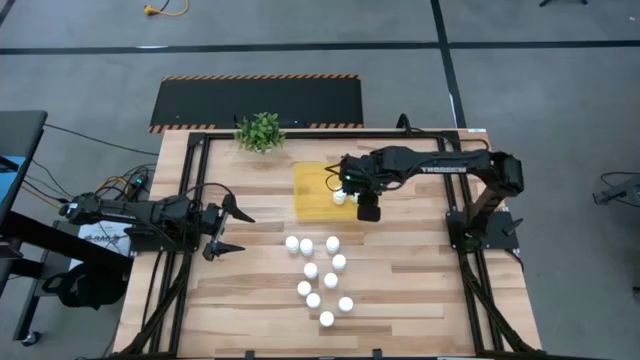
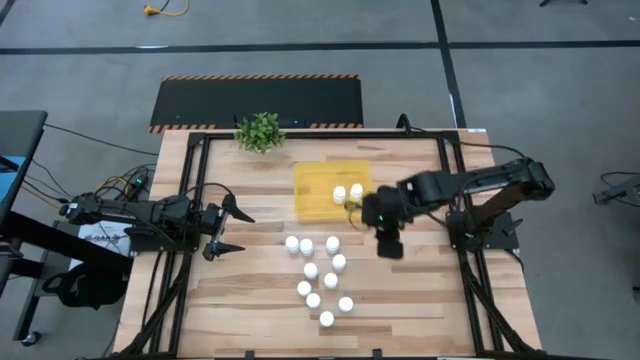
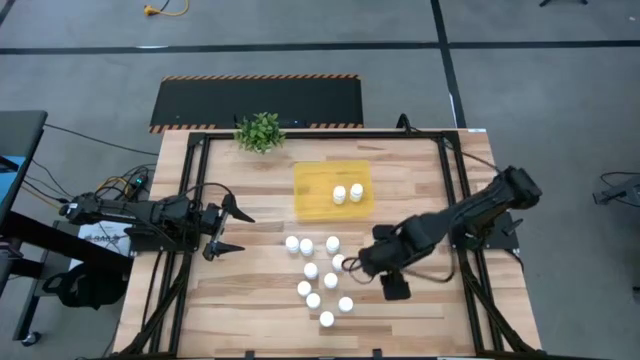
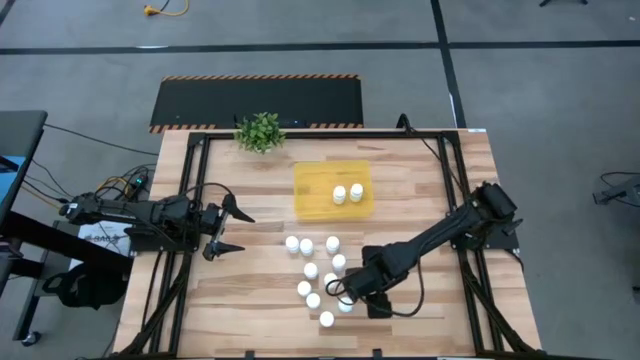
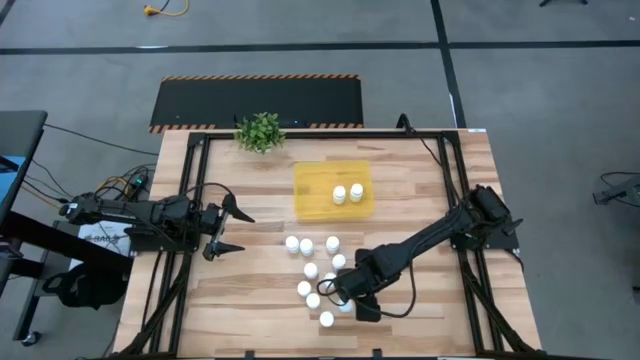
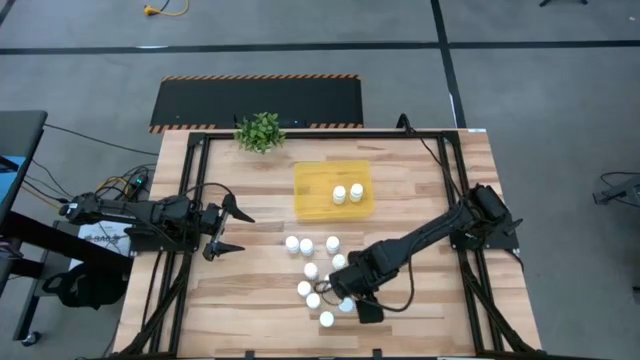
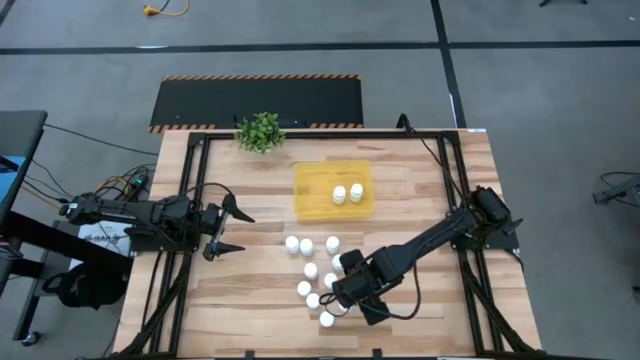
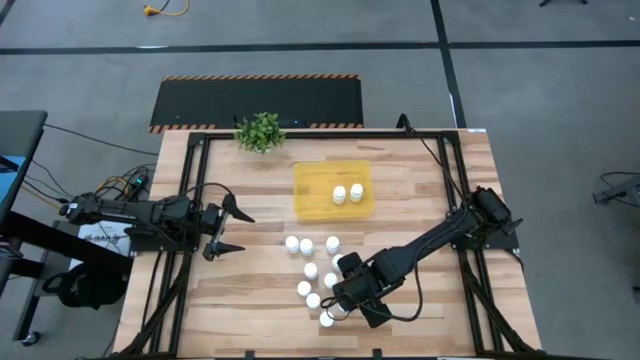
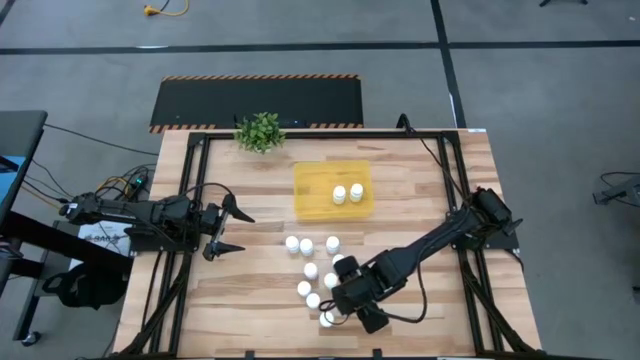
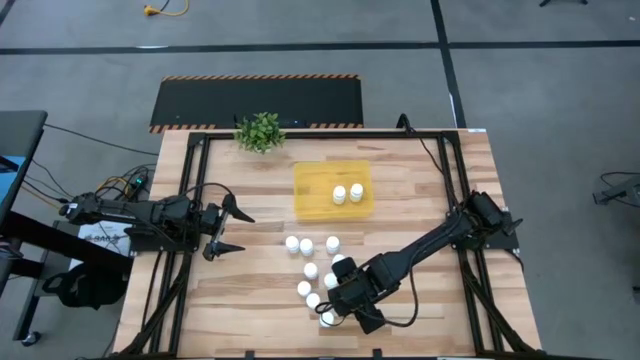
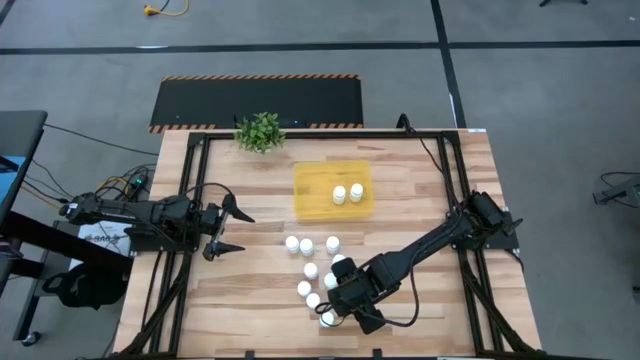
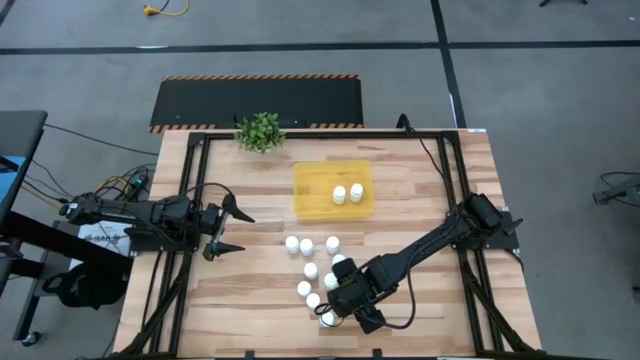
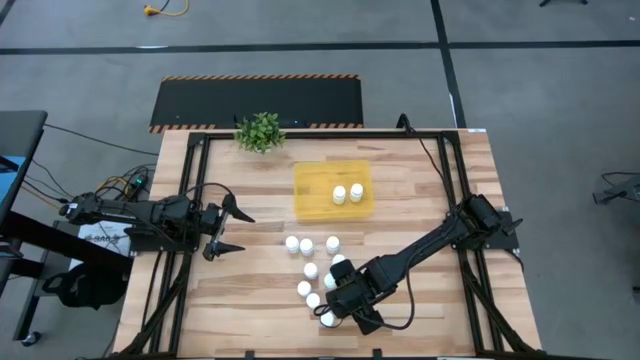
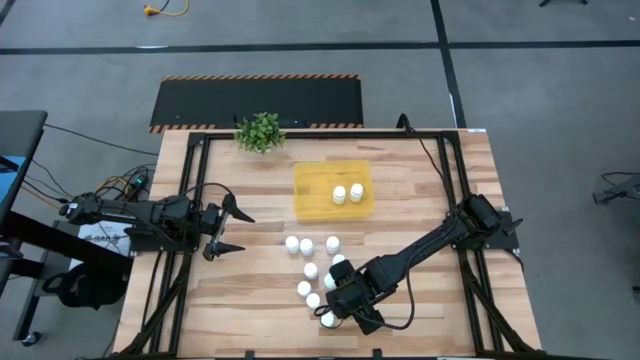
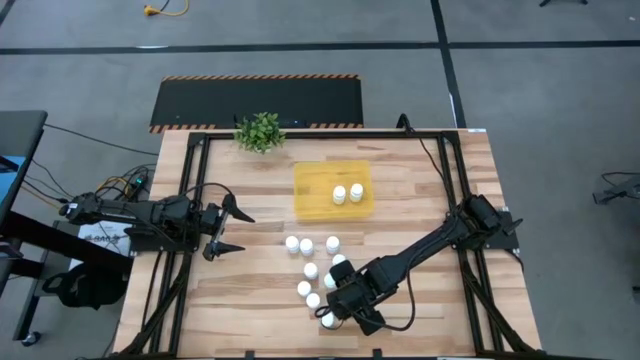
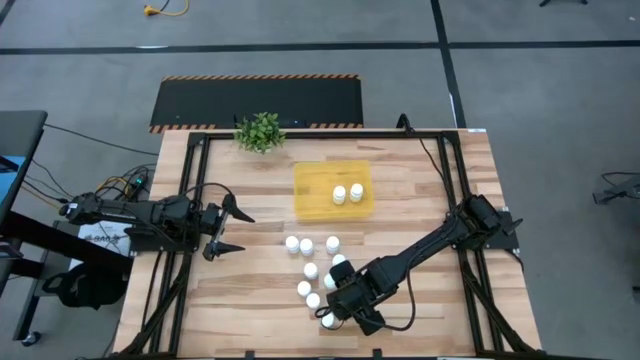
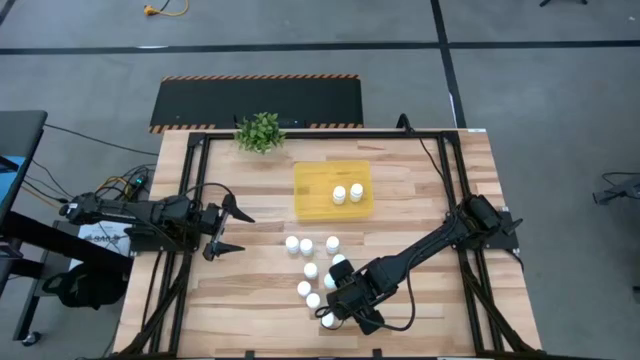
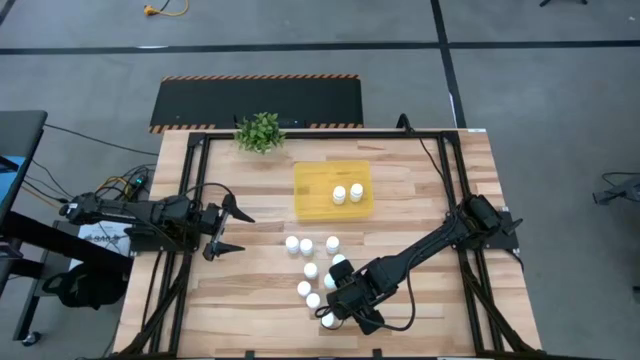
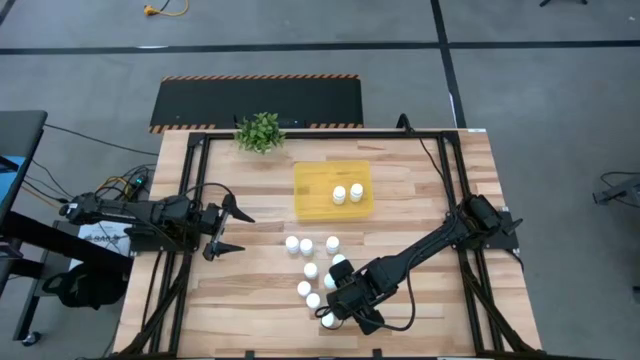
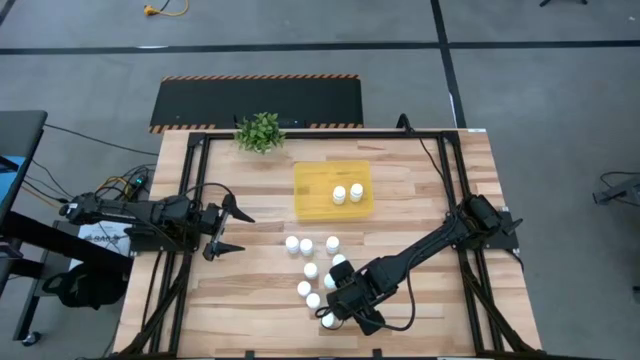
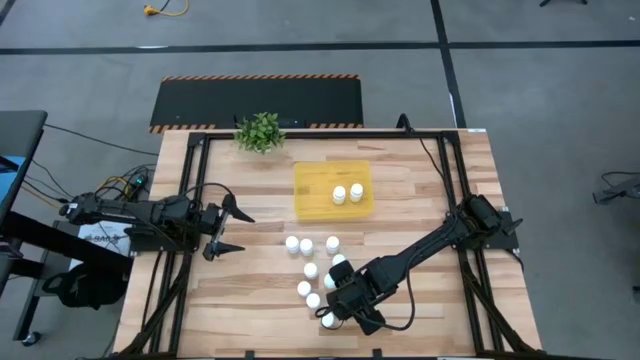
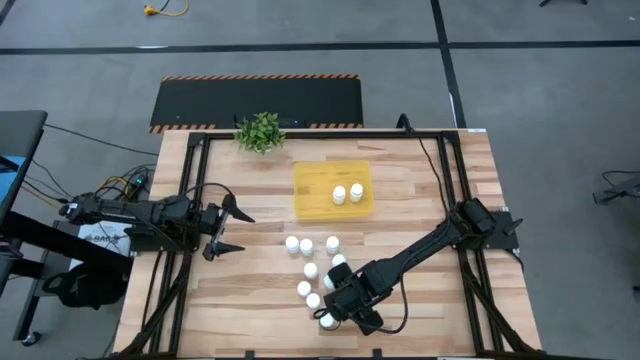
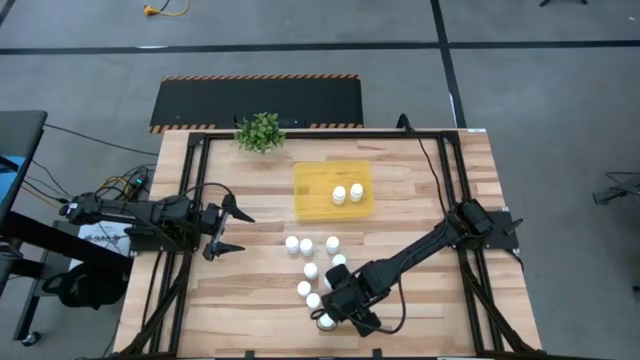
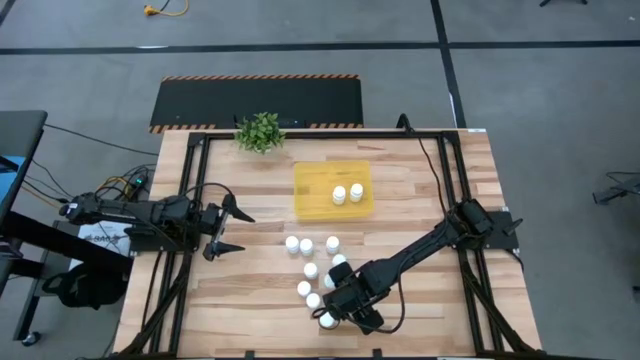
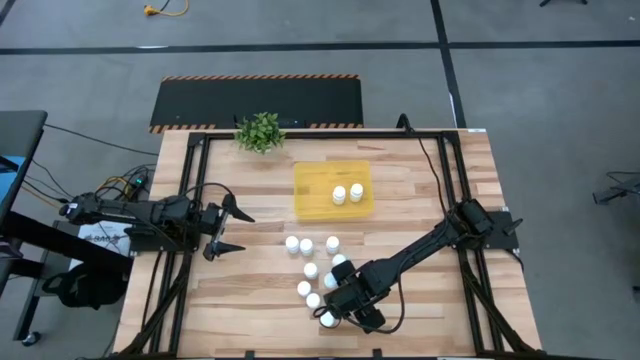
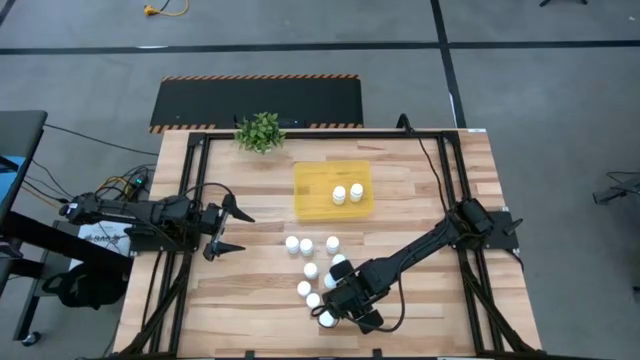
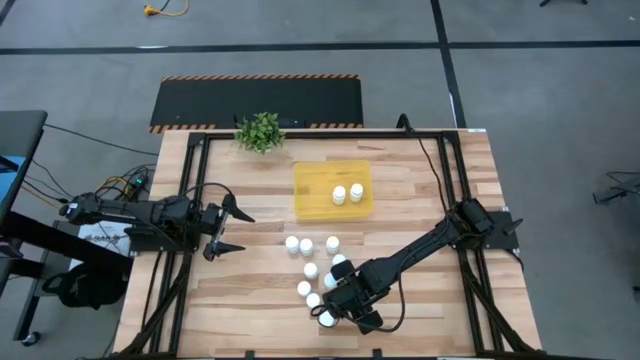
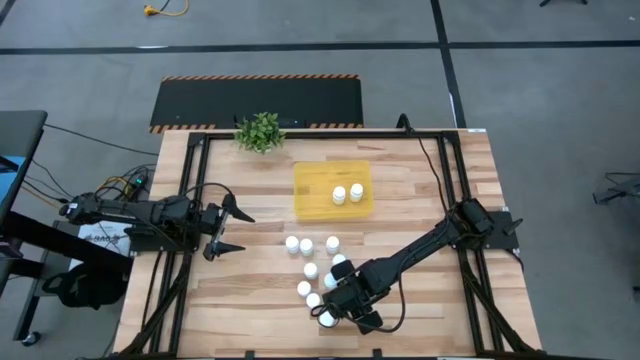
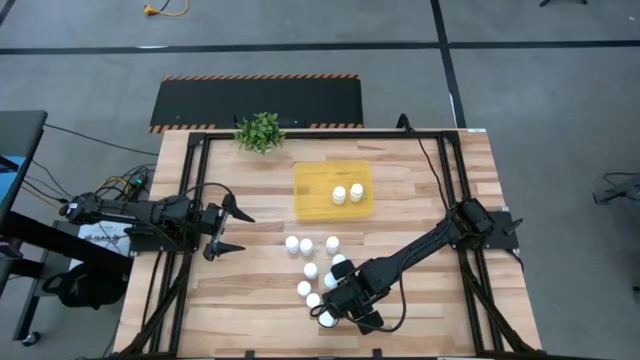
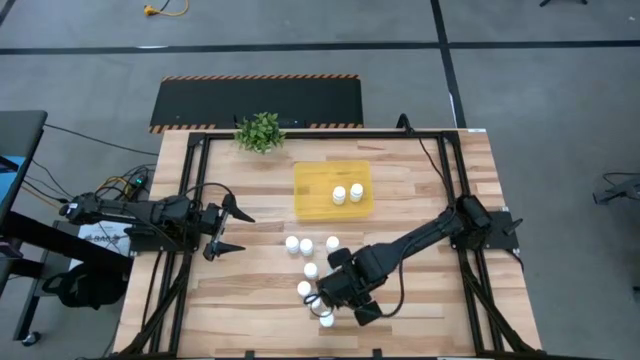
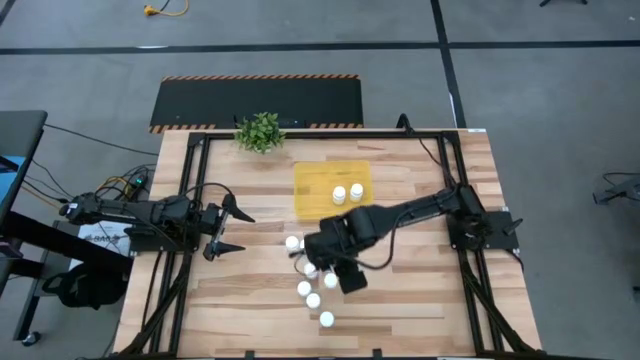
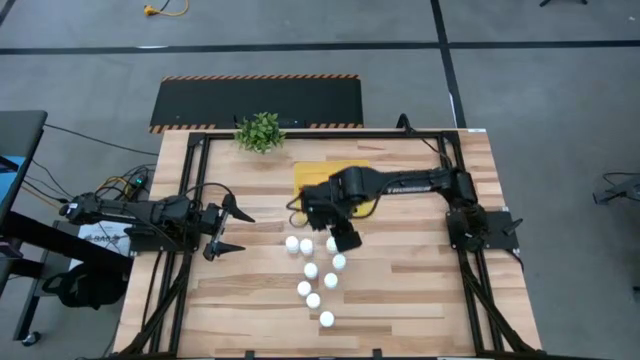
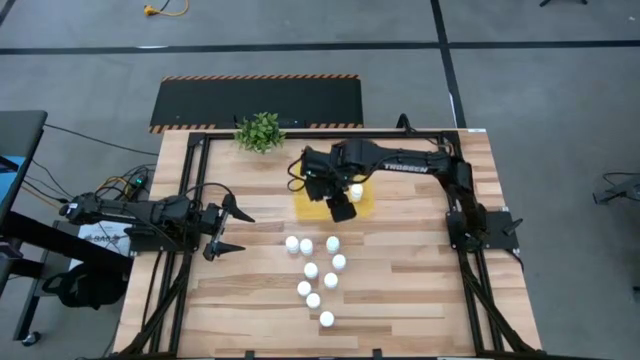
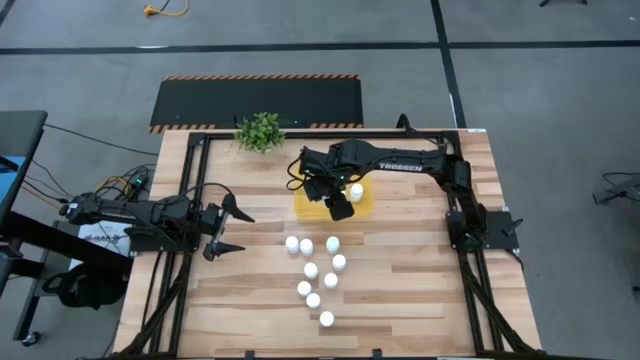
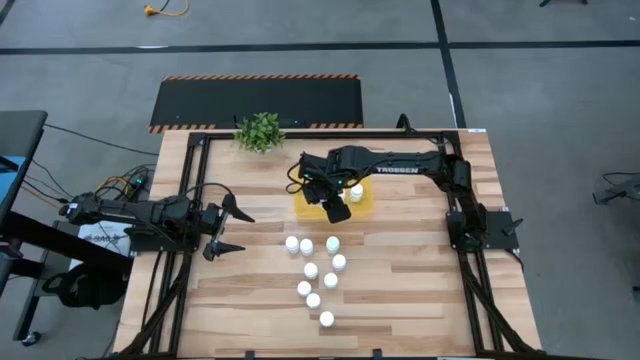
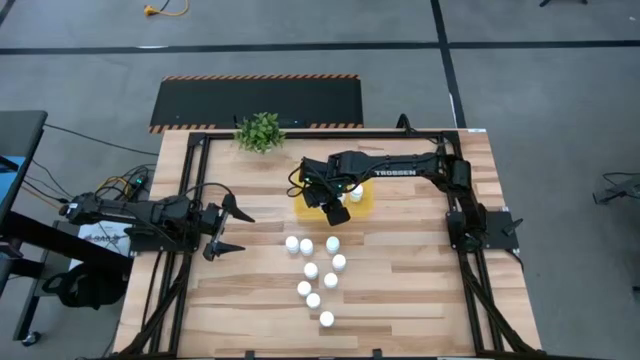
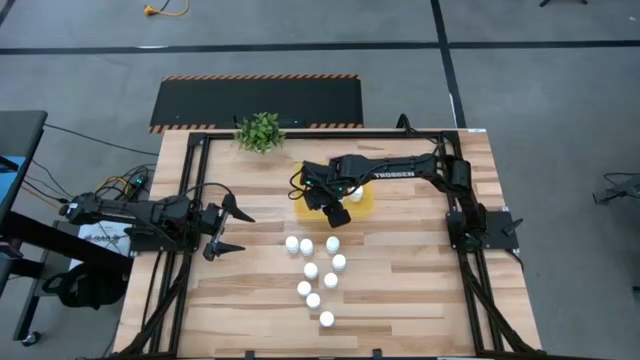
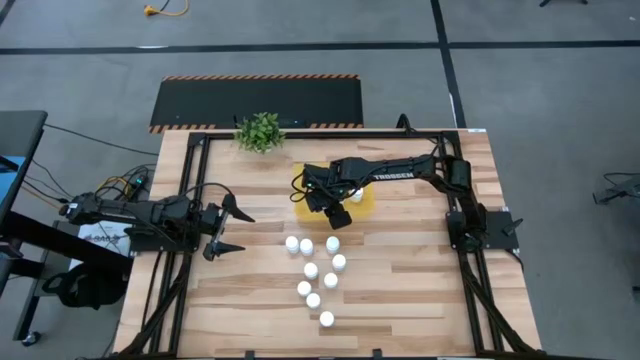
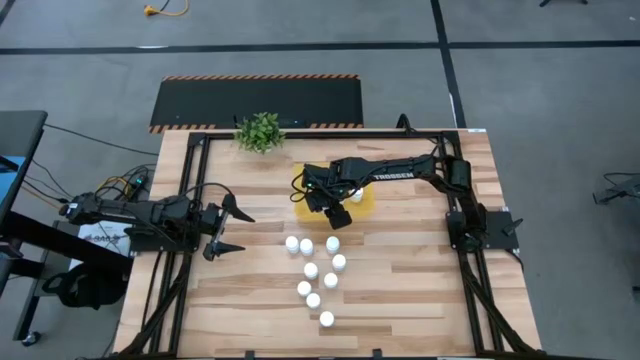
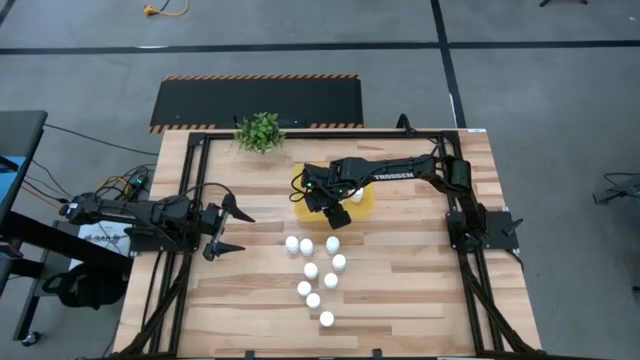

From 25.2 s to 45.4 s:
Task: Pick and place pill bottles into a basket
Put the white medicine bottle into the yellow bin
